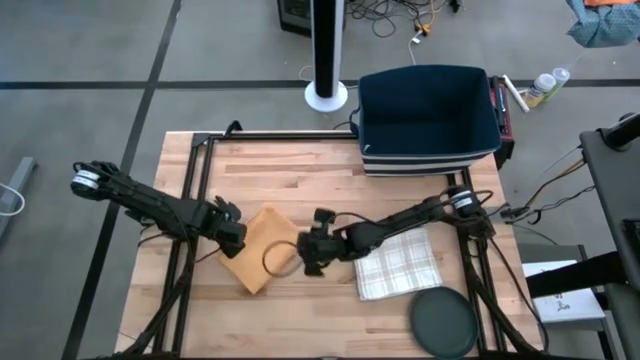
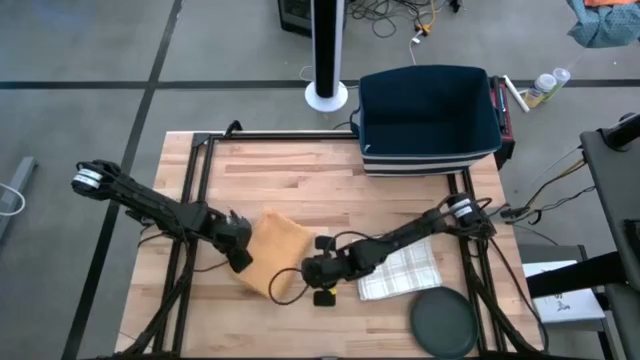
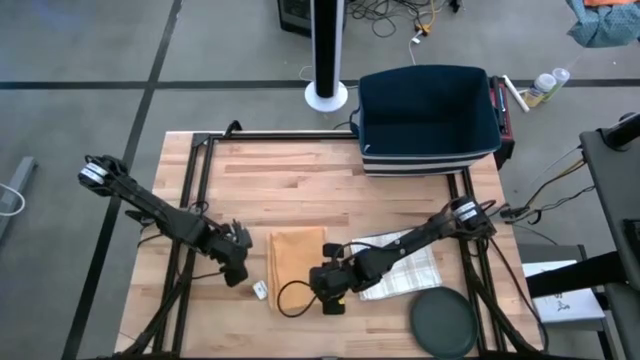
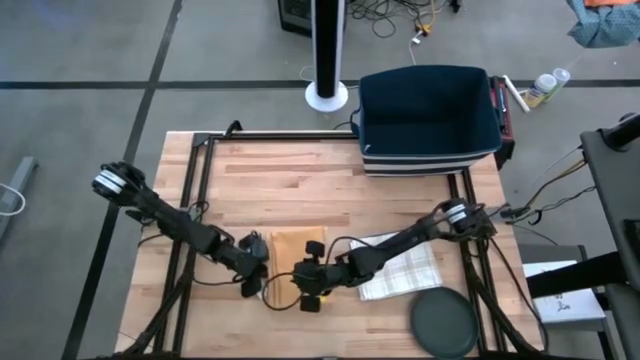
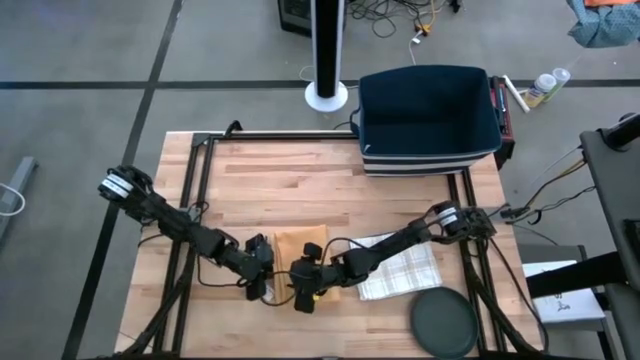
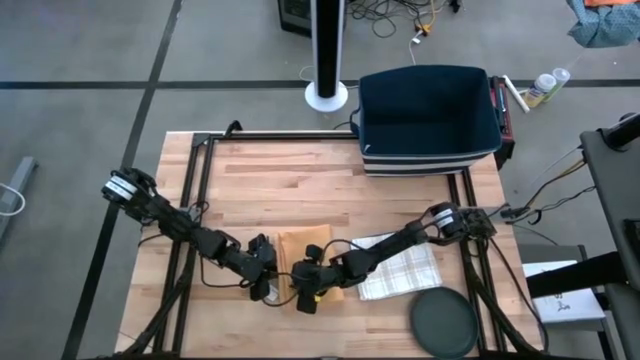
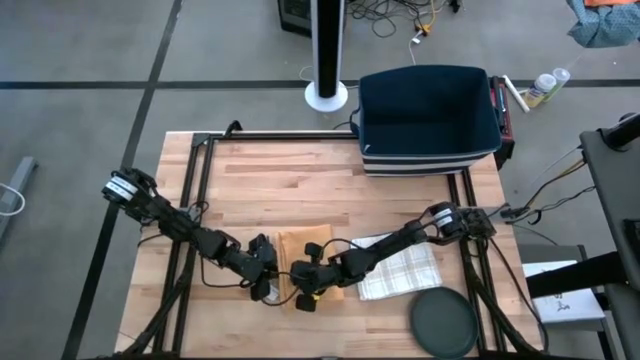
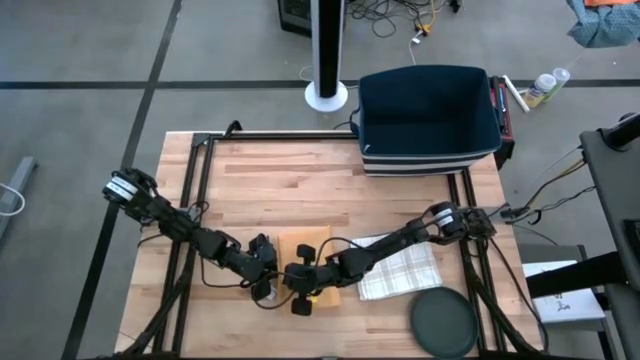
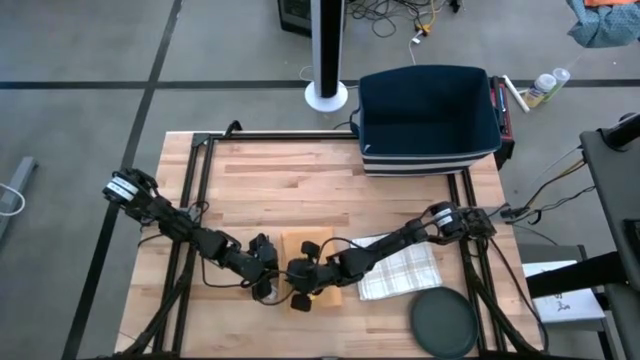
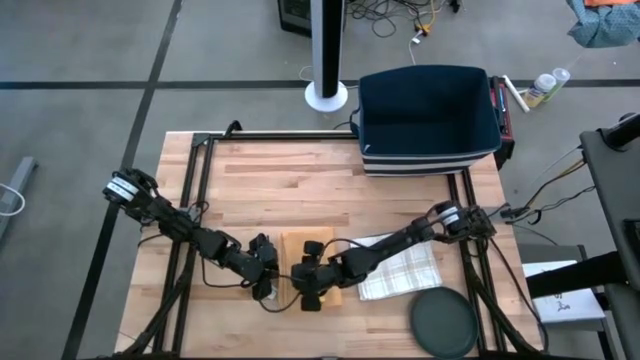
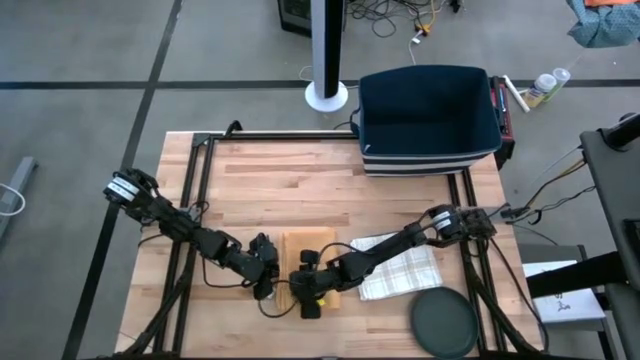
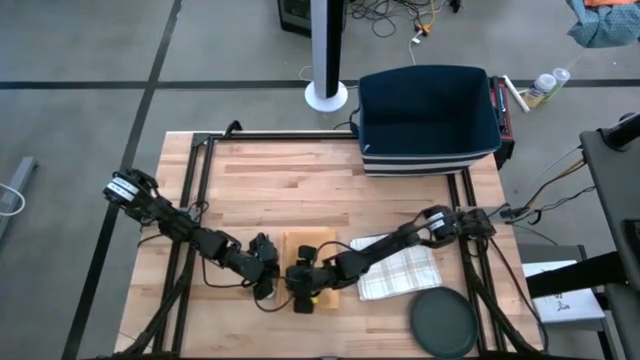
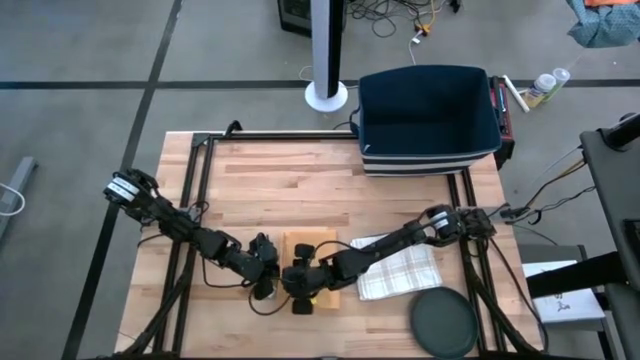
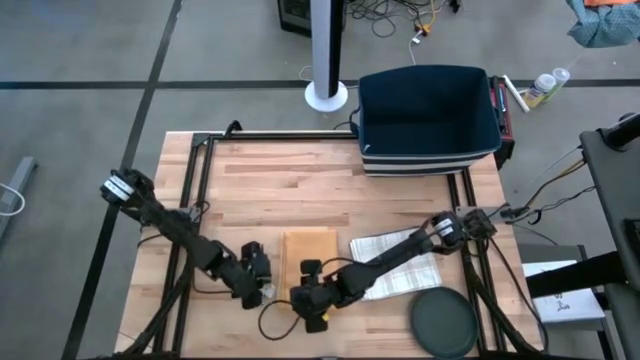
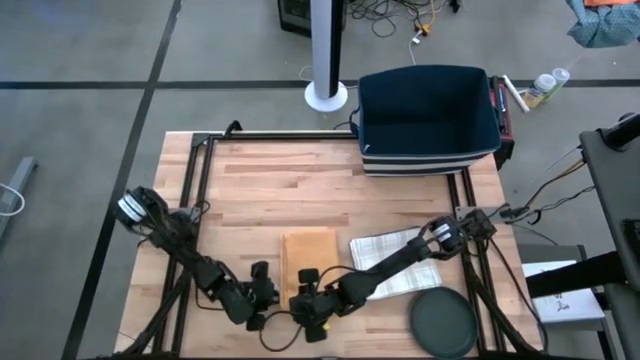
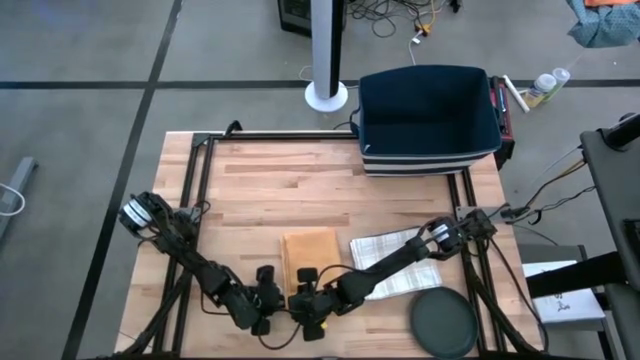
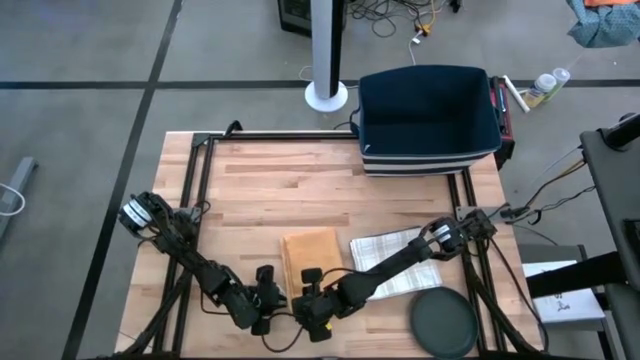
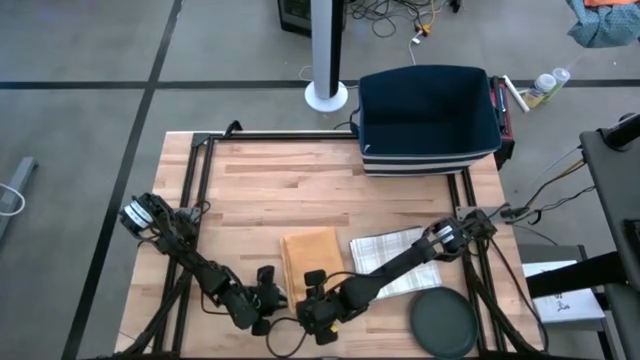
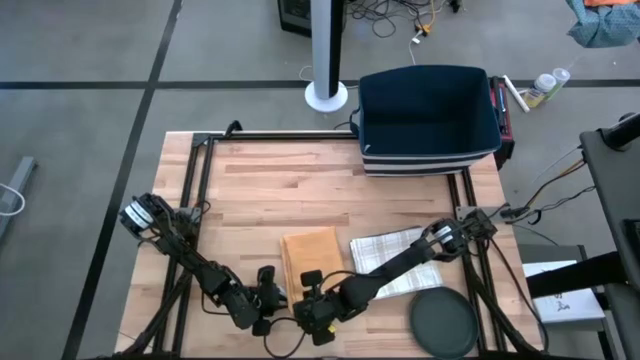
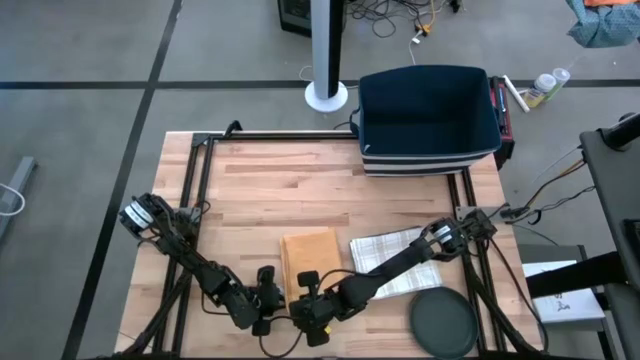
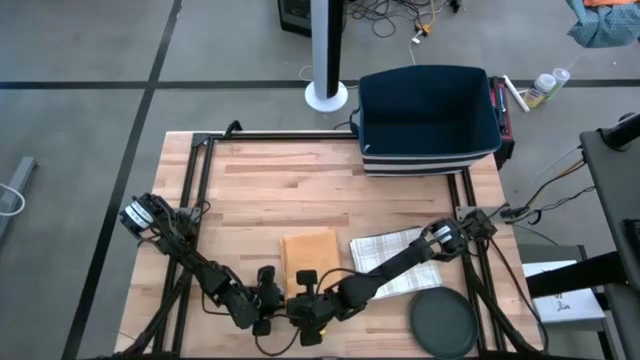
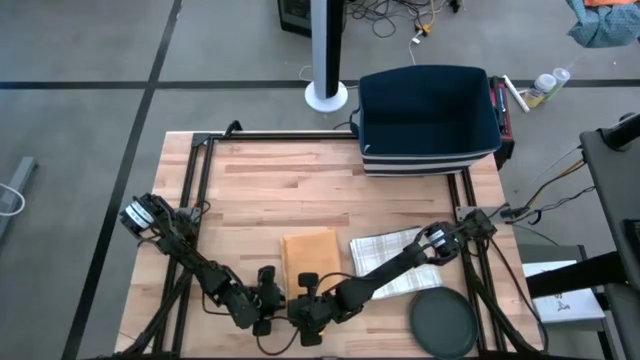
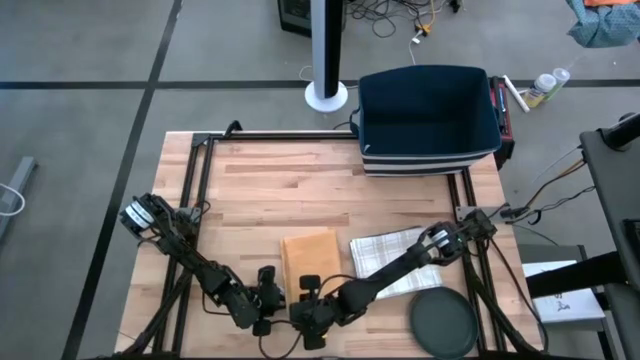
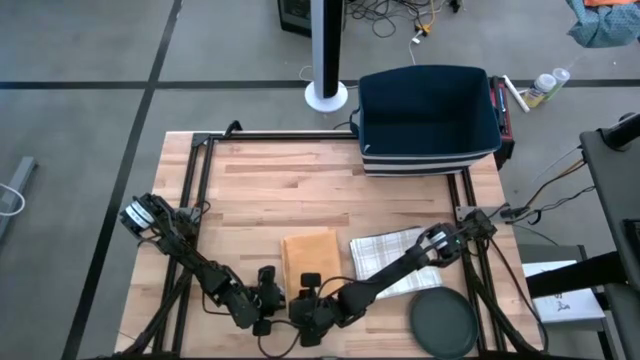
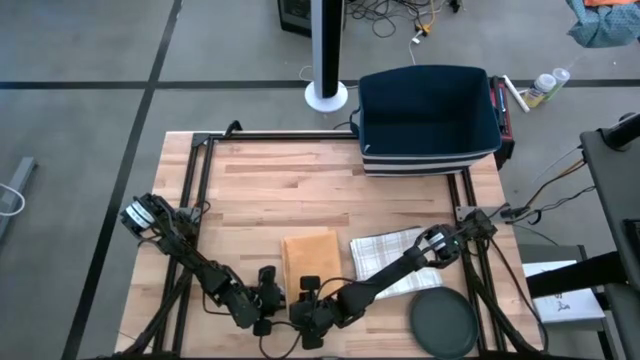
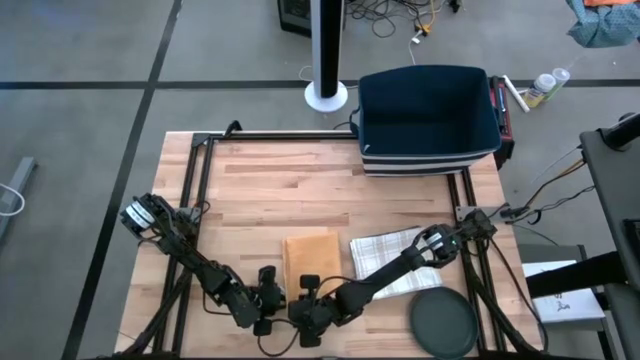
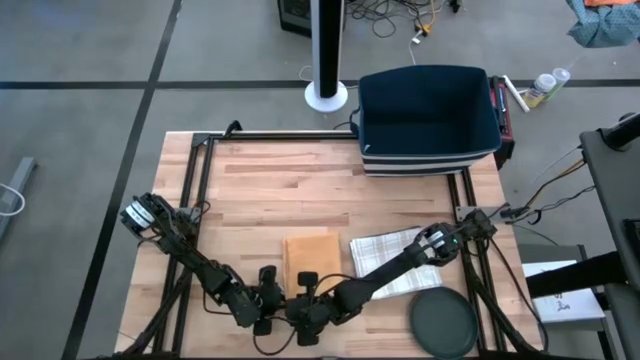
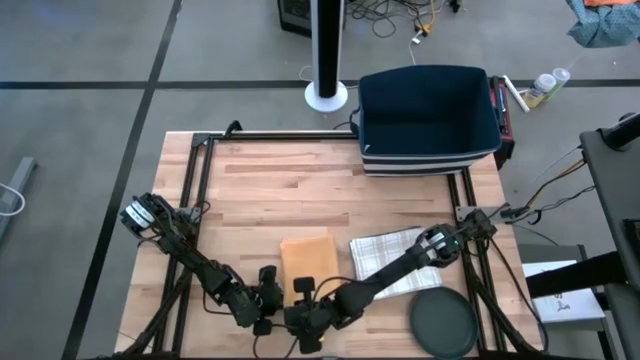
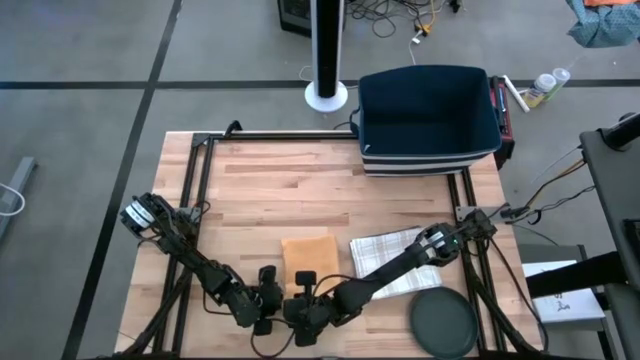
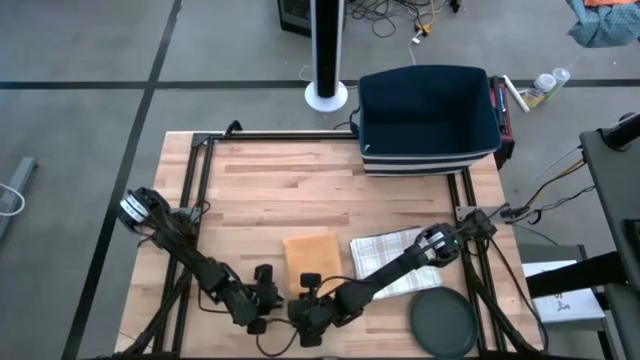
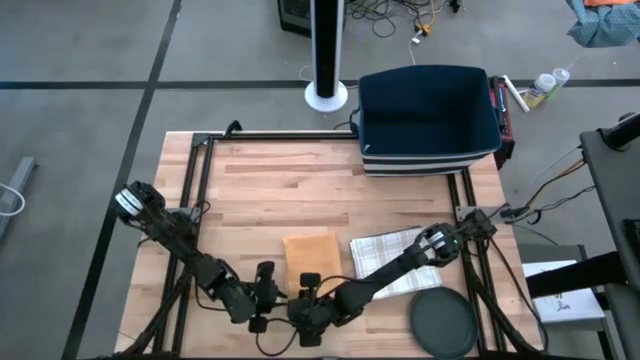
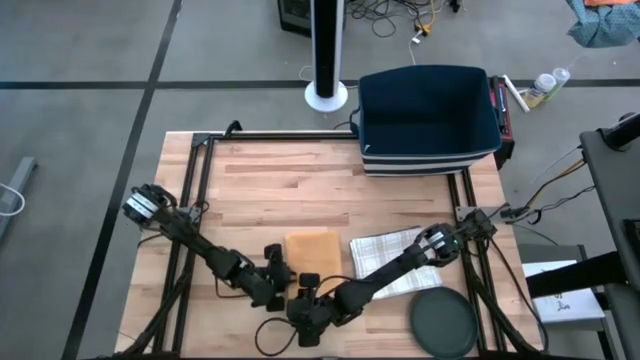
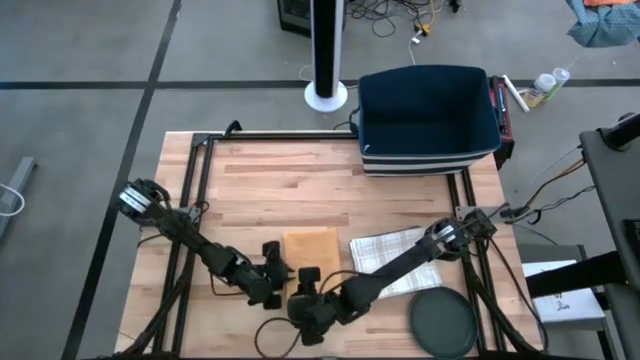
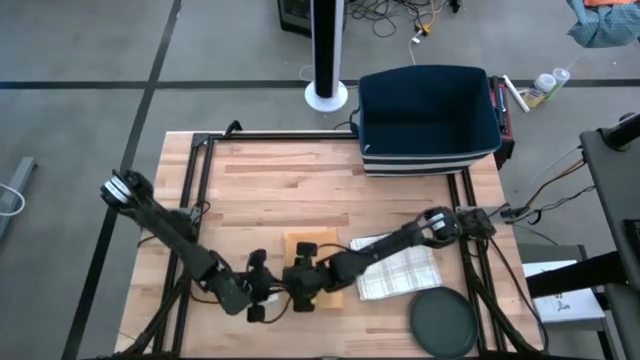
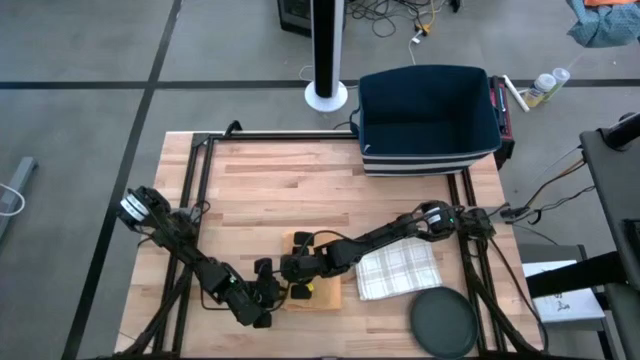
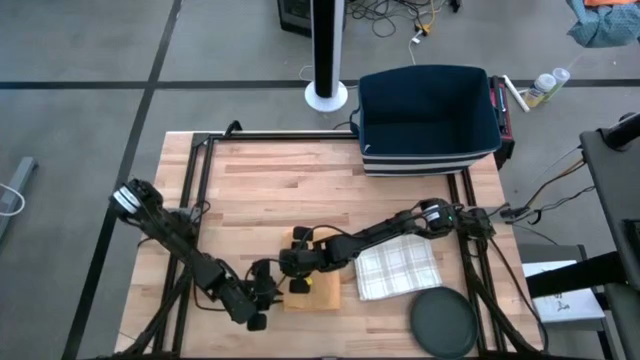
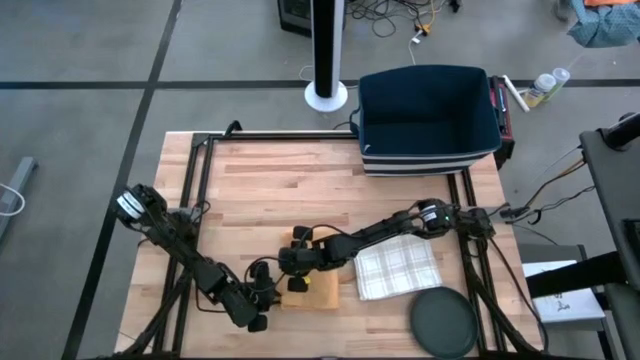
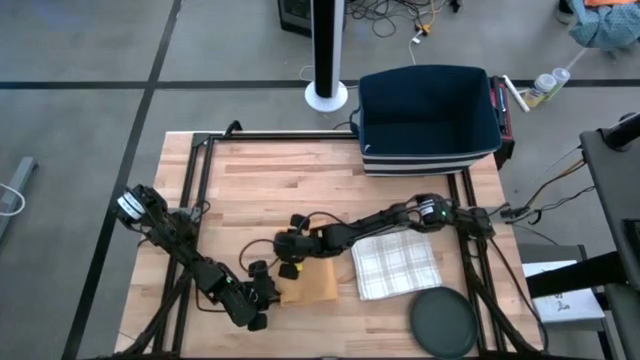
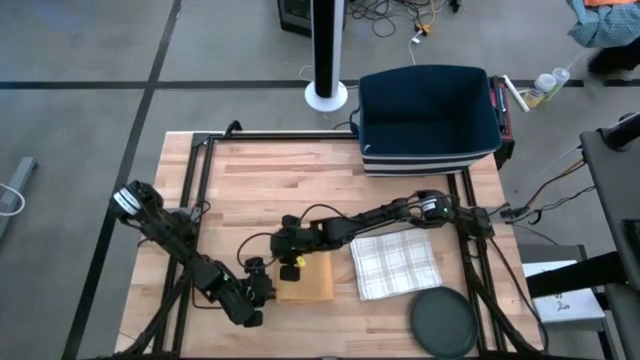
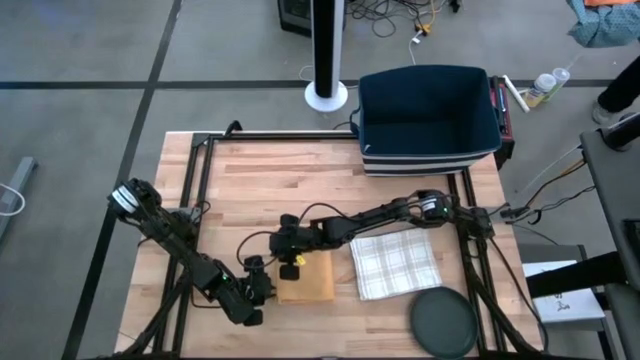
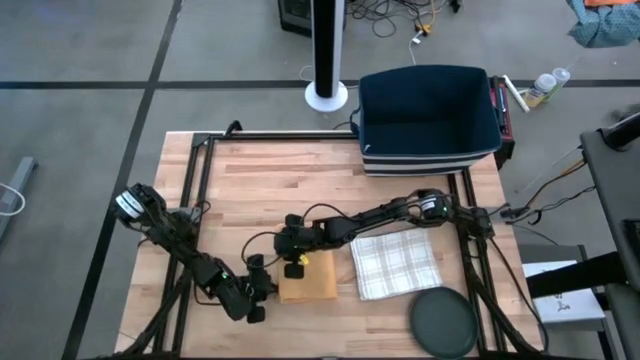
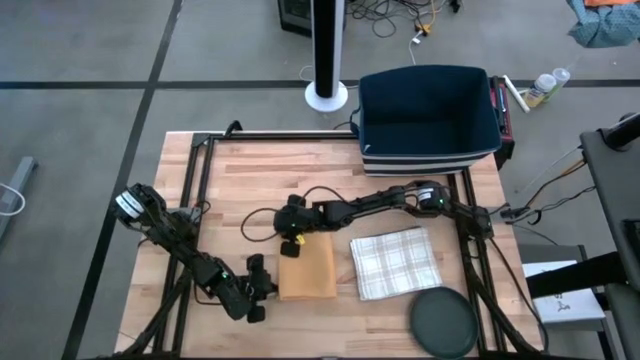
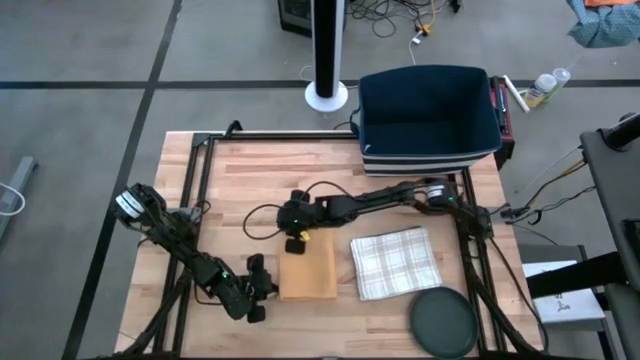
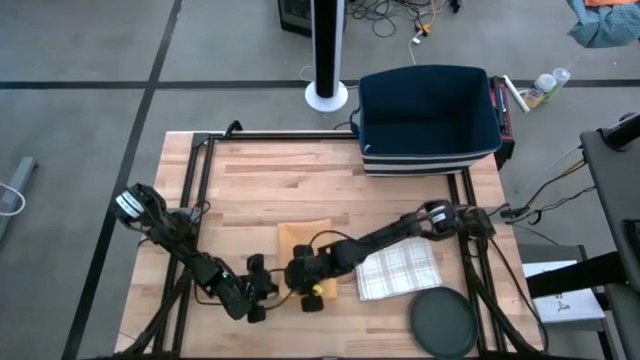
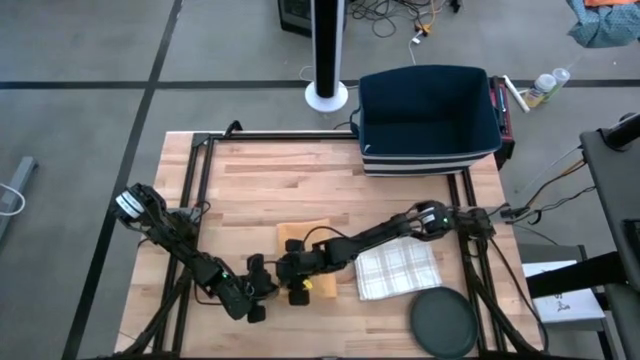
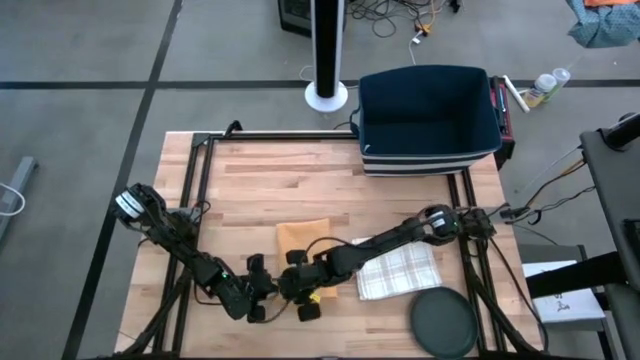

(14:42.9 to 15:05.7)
Task: Fold kitchen towel into neat rectangle
Fold the orange towel
